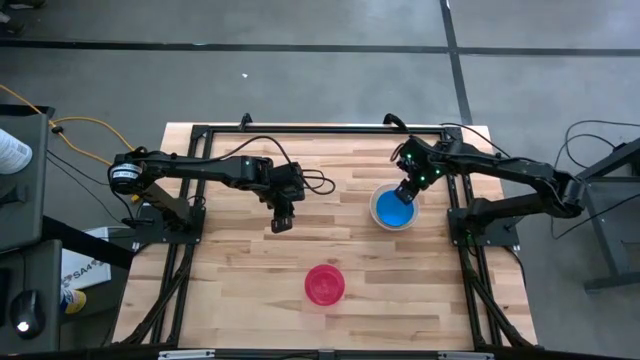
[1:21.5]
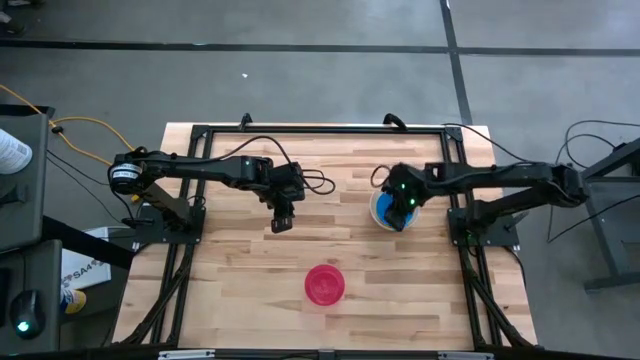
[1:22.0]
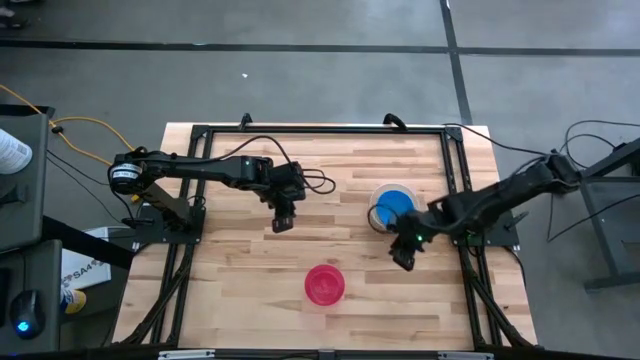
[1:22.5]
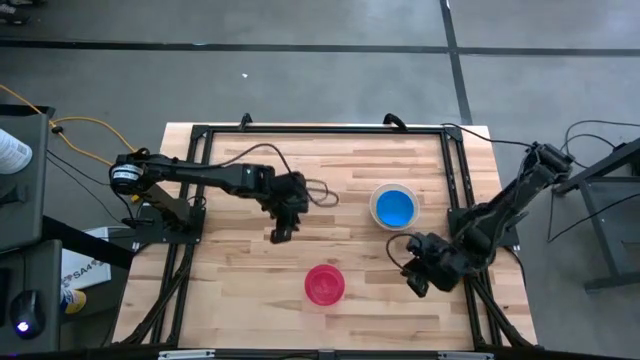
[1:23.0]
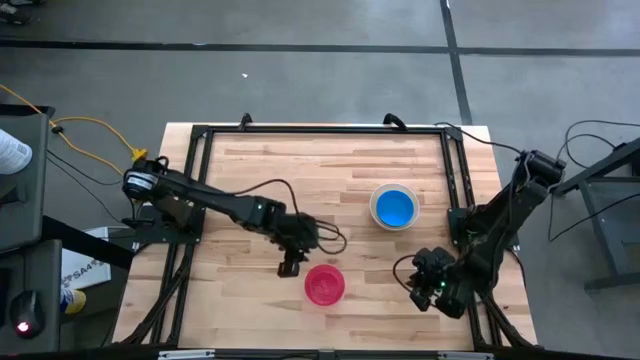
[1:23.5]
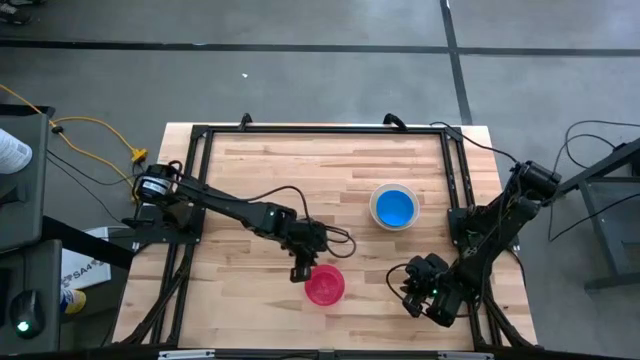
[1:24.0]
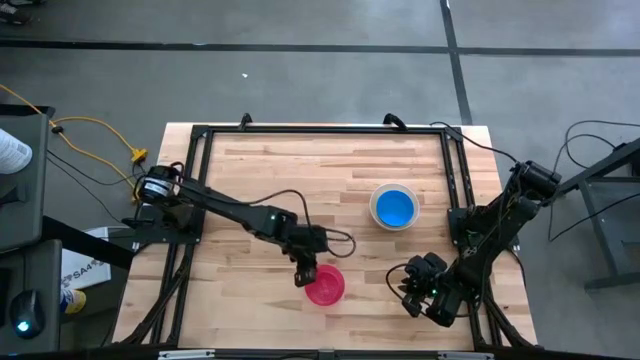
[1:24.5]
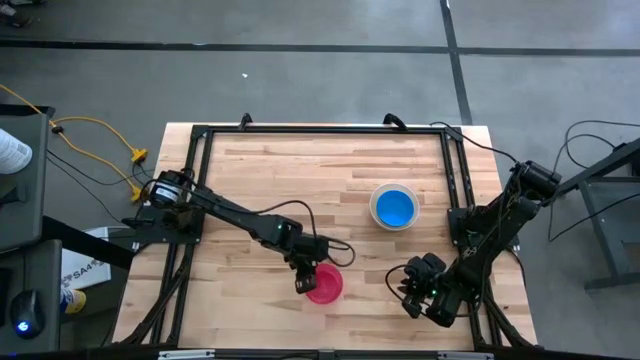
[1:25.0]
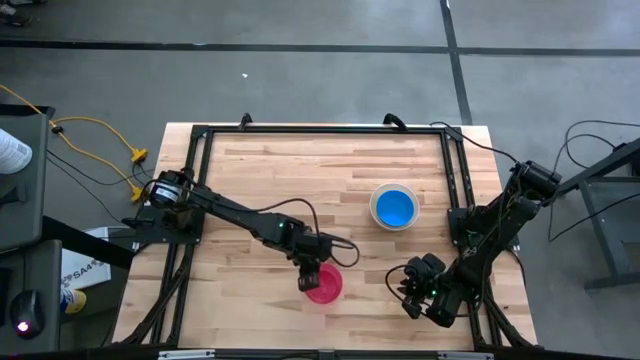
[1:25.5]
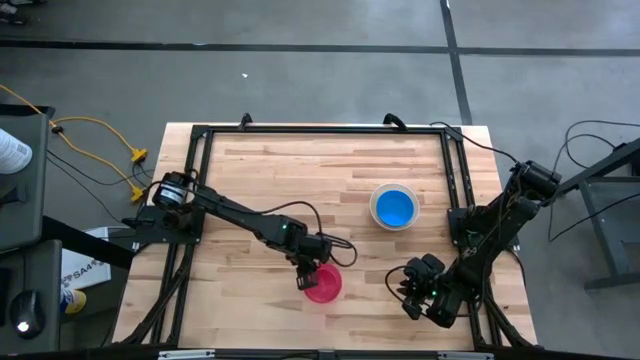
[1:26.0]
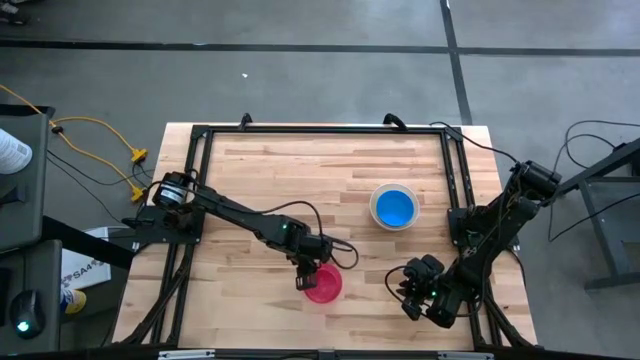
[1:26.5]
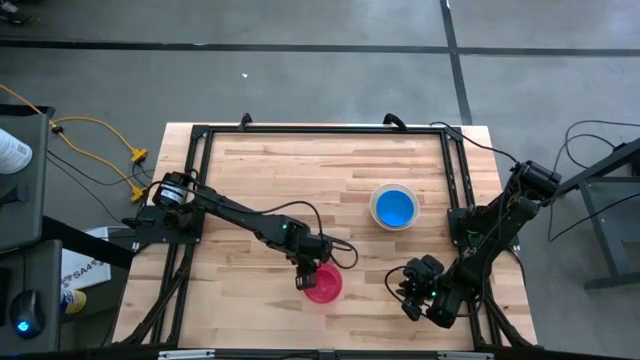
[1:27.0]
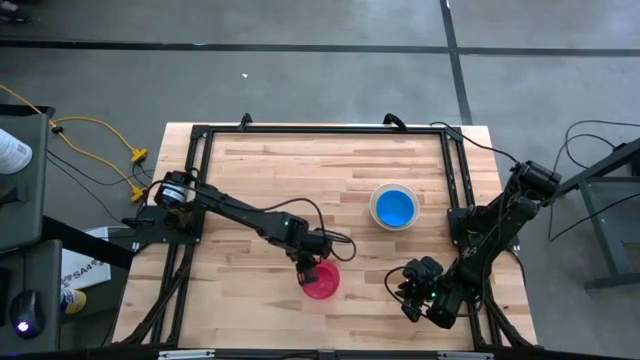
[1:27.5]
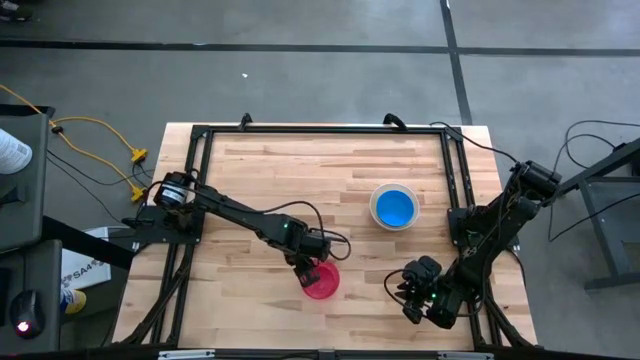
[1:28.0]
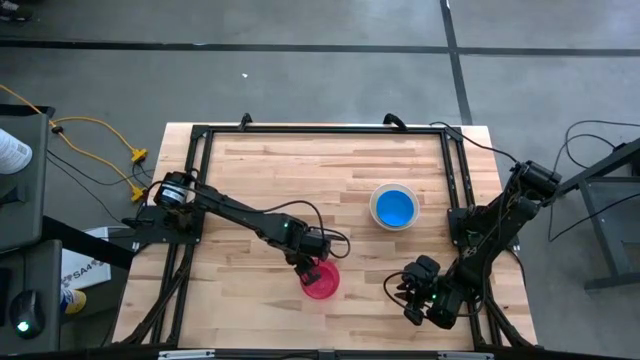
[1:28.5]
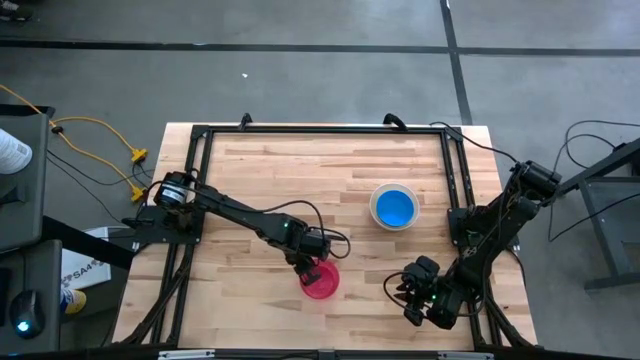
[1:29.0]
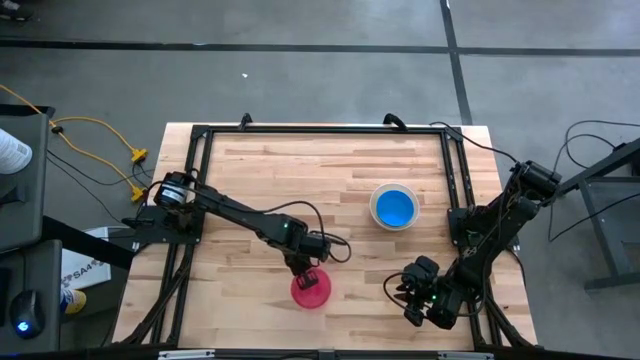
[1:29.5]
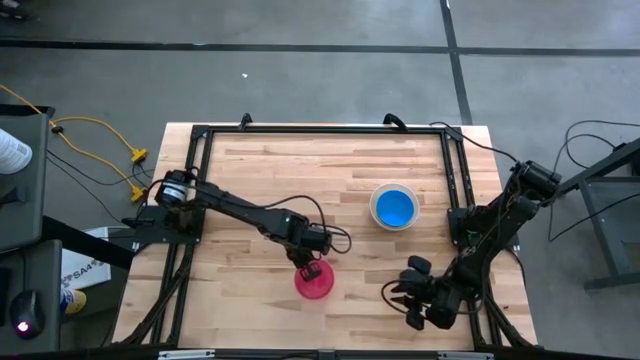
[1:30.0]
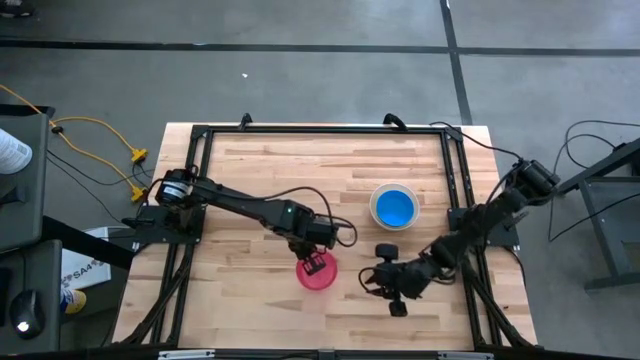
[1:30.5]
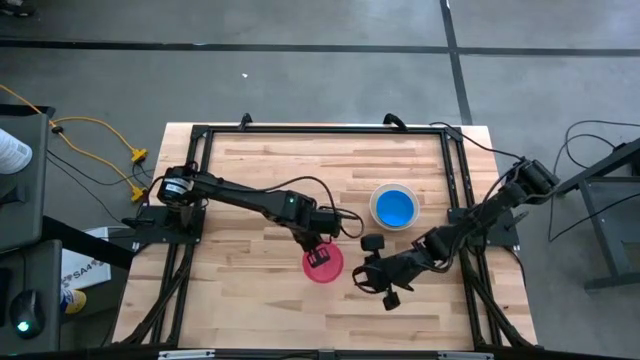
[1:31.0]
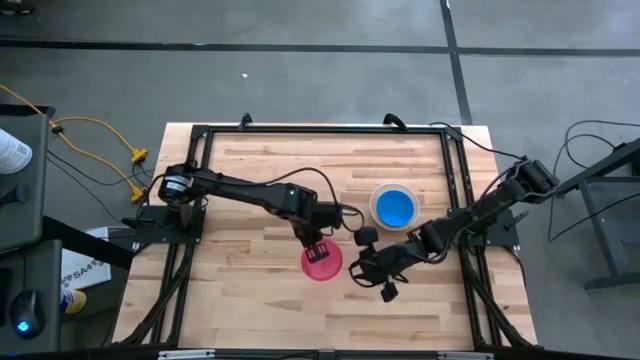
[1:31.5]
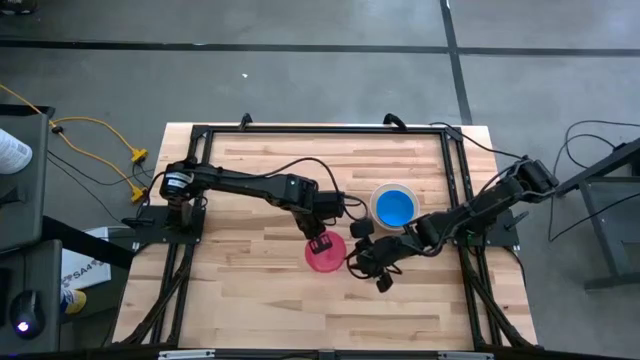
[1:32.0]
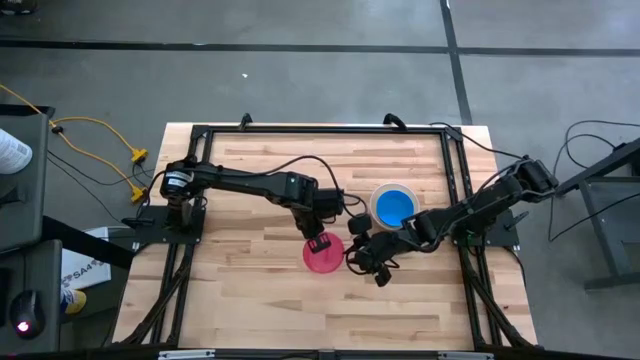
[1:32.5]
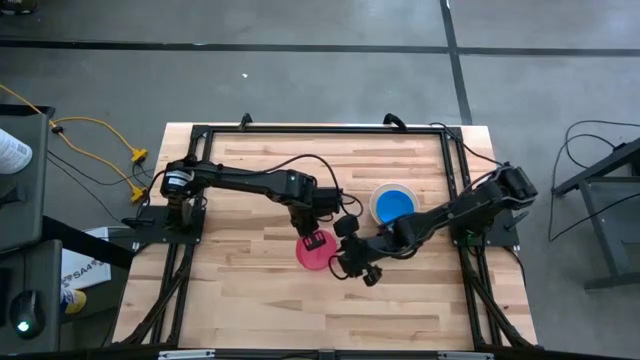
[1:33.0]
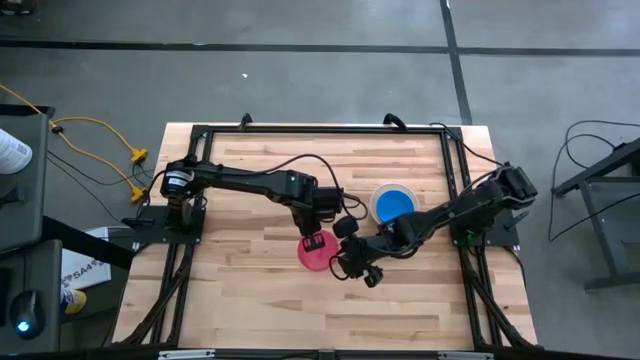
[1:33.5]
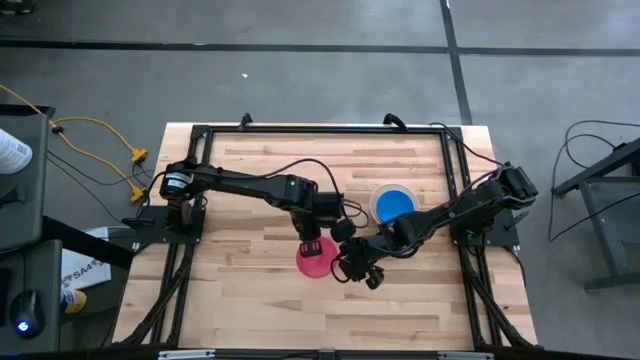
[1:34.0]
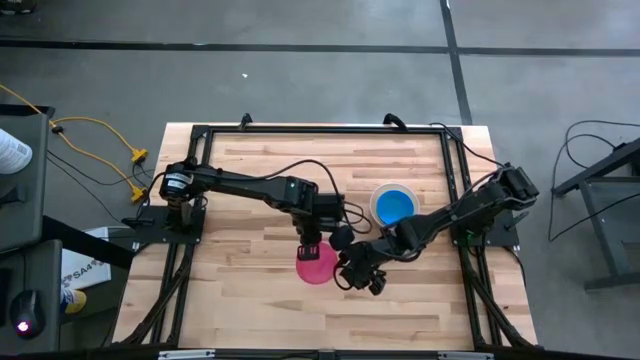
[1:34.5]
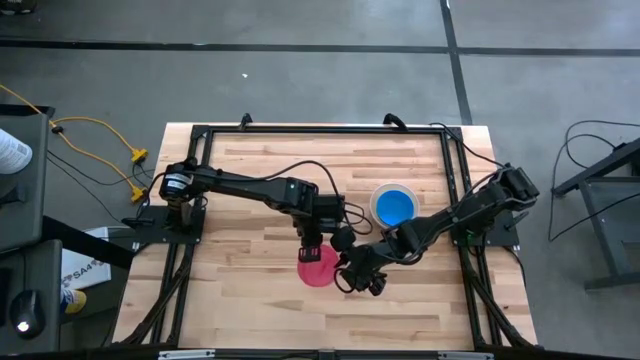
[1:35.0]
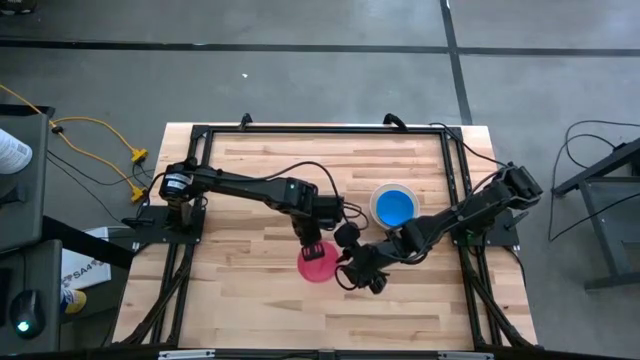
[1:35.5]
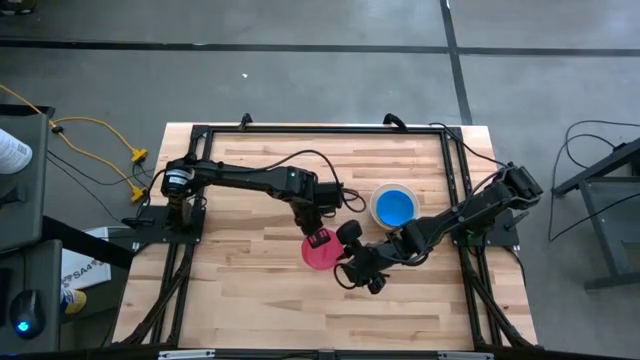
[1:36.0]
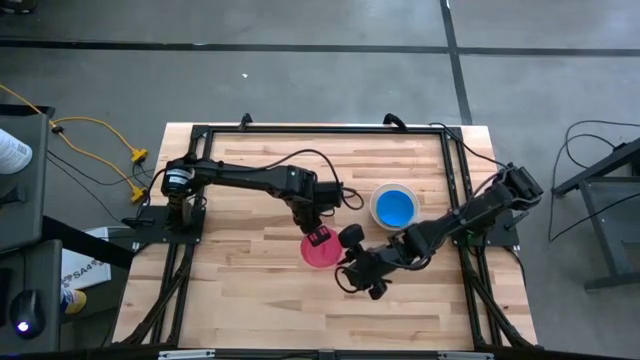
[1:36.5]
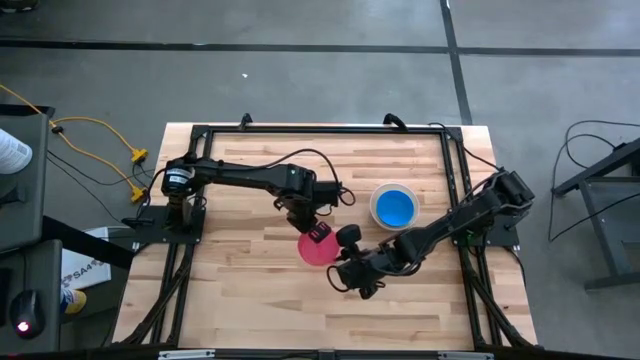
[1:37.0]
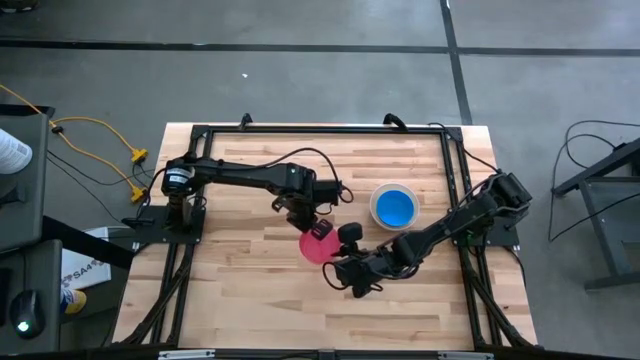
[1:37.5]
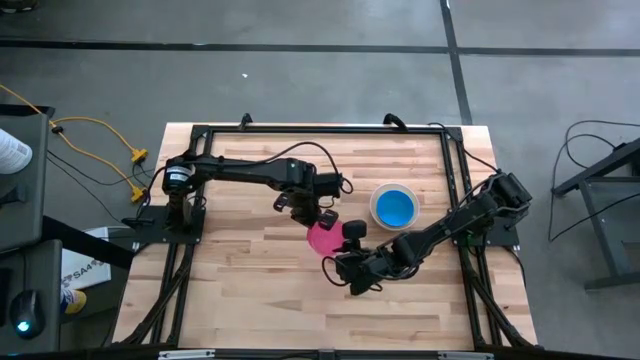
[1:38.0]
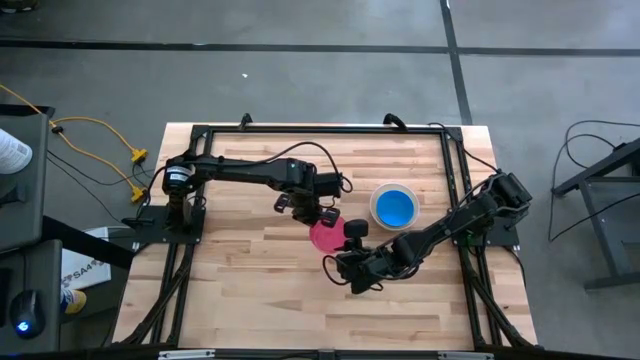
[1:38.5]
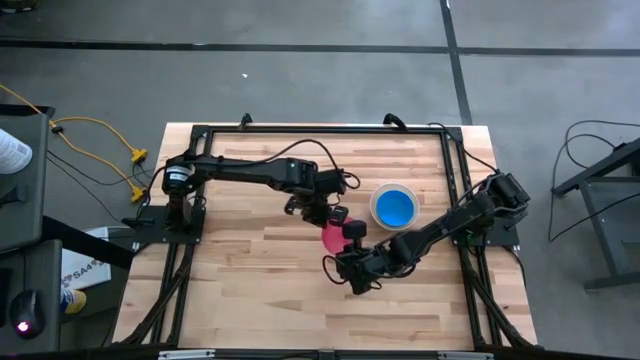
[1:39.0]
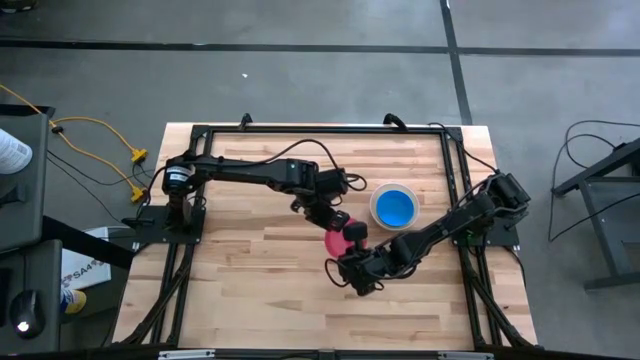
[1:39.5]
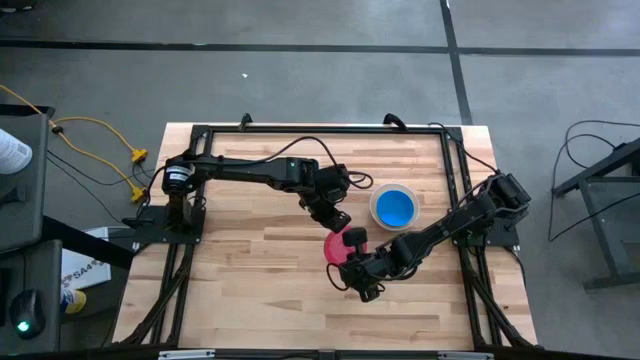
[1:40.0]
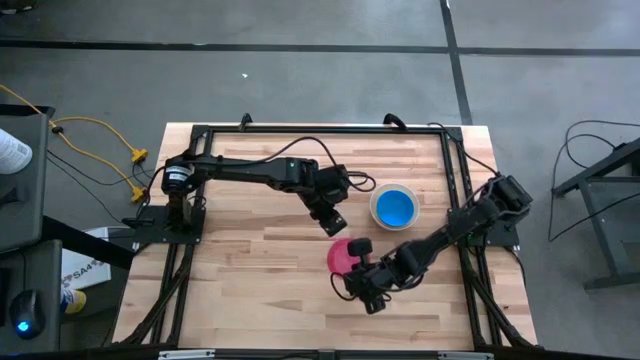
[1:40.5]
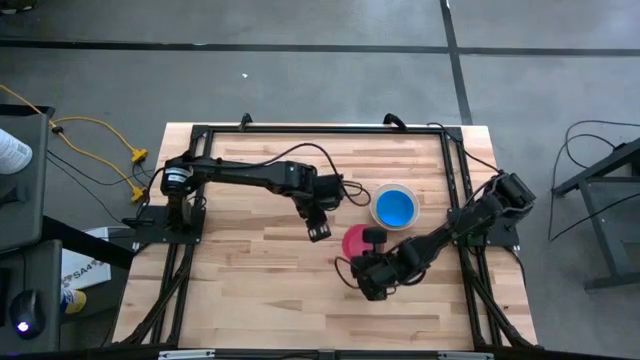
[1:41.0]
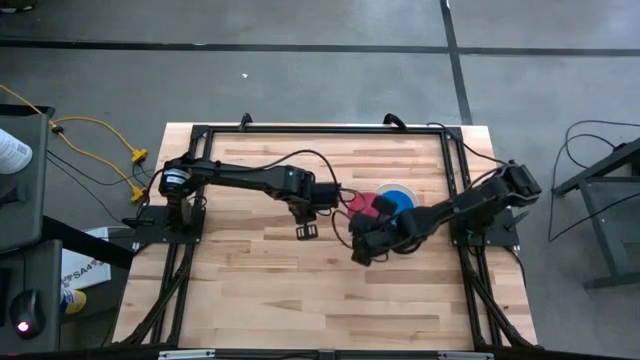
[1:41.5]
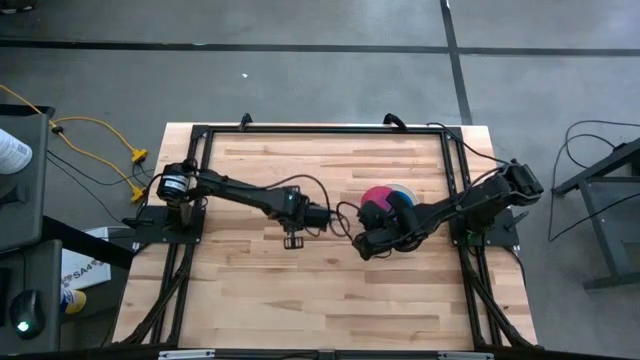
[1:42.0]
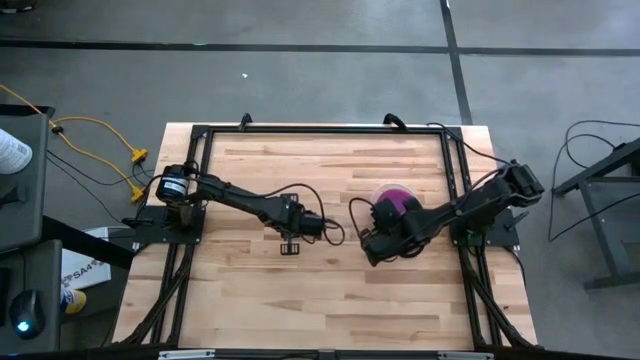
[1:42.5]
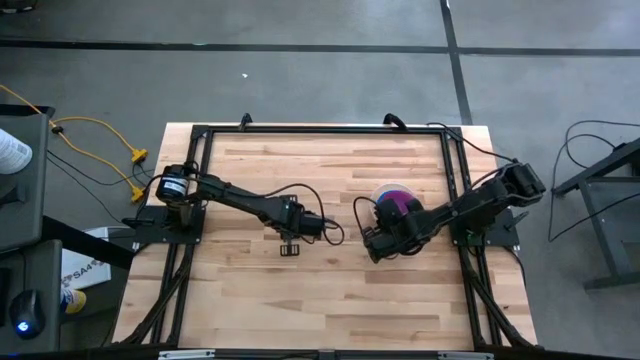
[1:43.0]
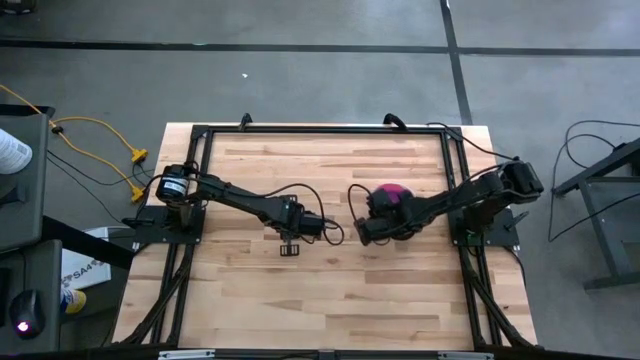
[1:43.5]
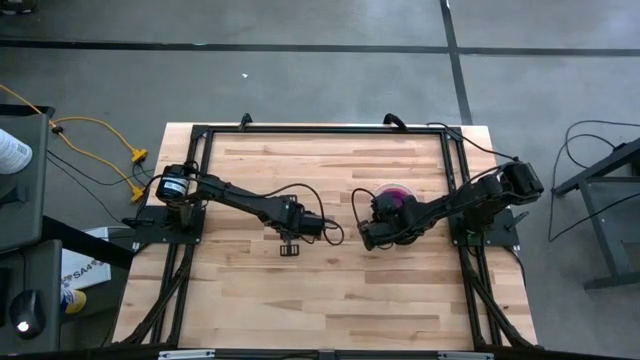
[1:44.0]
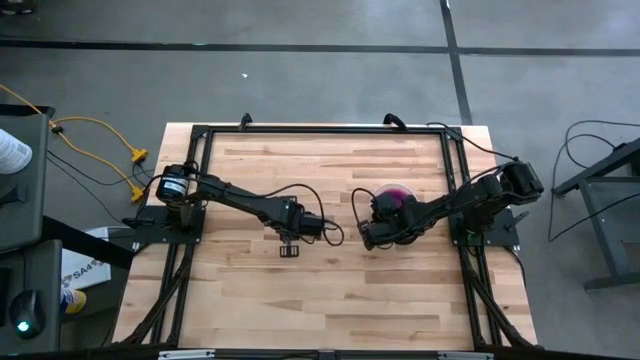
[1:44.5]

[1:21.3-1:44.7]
Stack the red bowl on top of the blue bowl
